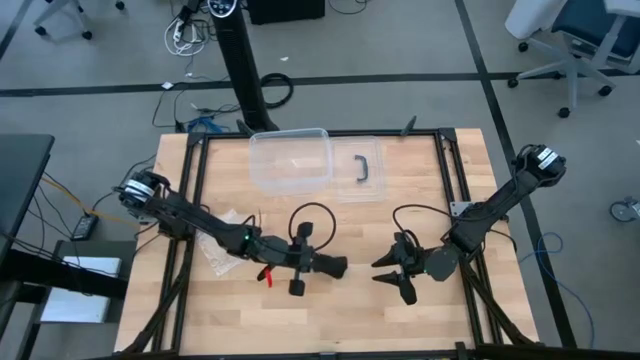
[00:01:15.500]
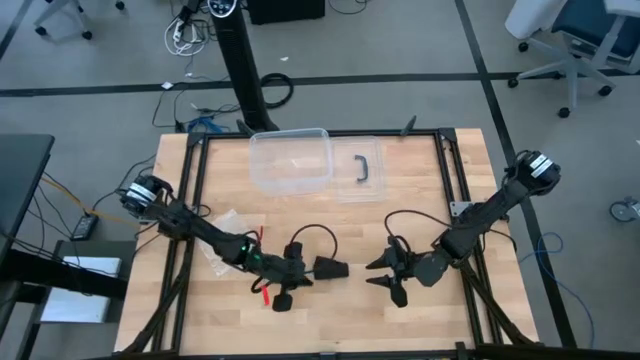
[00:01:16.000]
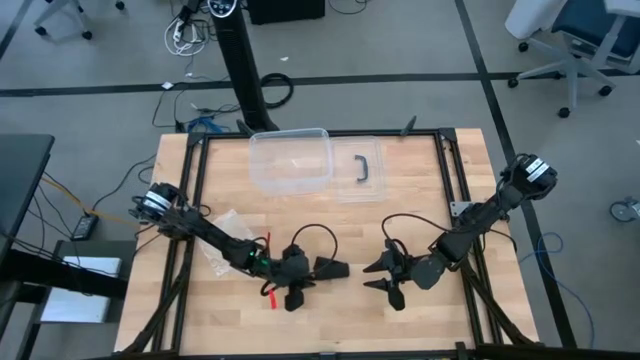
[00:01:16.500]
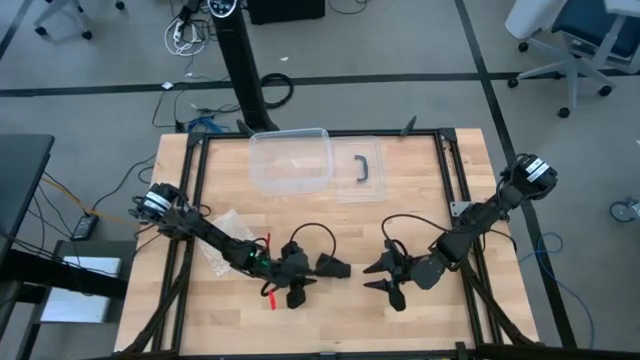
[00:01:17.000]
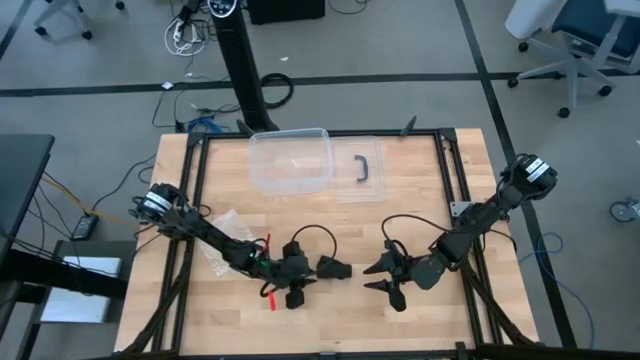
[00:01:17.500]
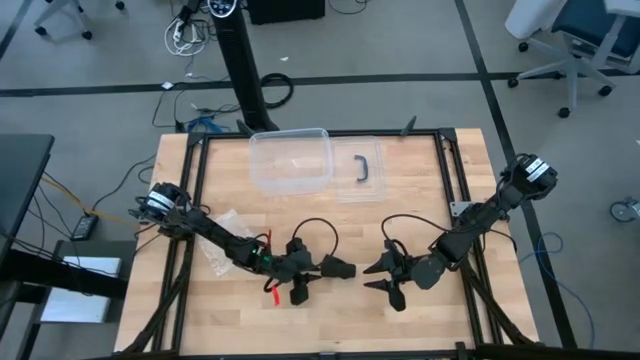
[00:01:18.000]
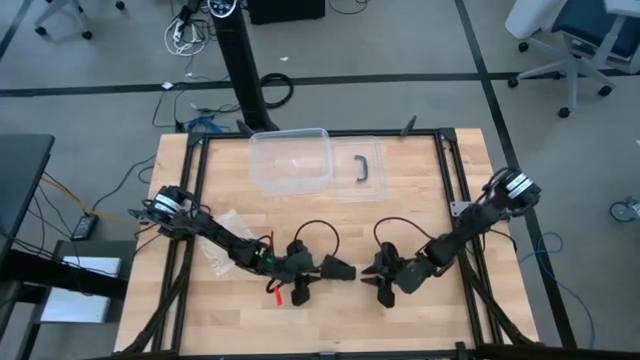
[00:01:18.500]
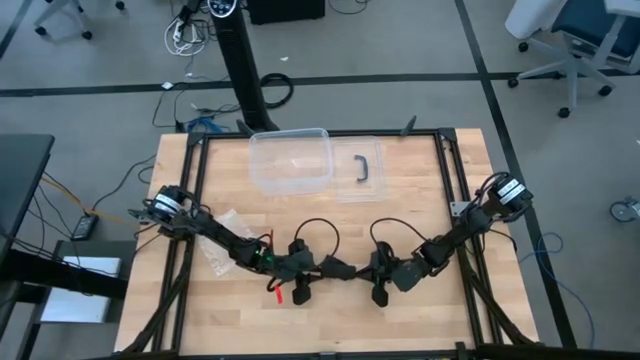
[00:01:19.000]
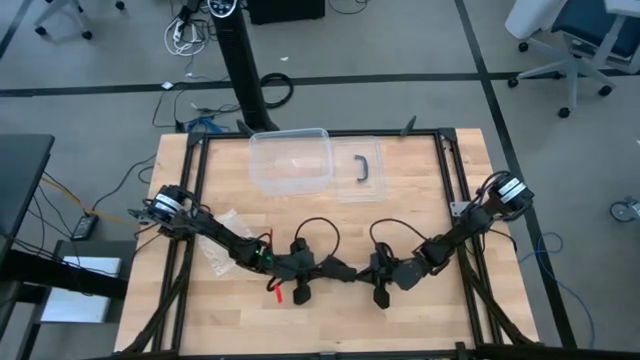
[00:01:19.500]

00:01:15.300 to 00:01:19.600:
Task: Roll bandage
Roll the black bandage

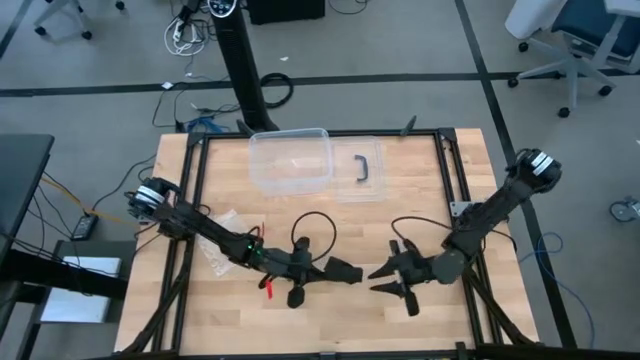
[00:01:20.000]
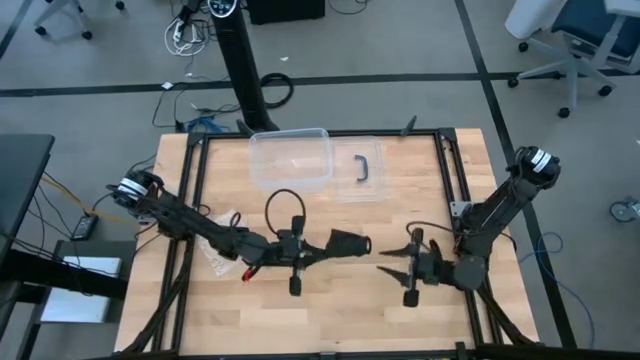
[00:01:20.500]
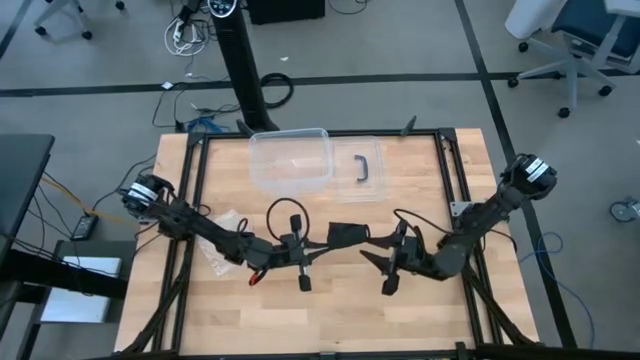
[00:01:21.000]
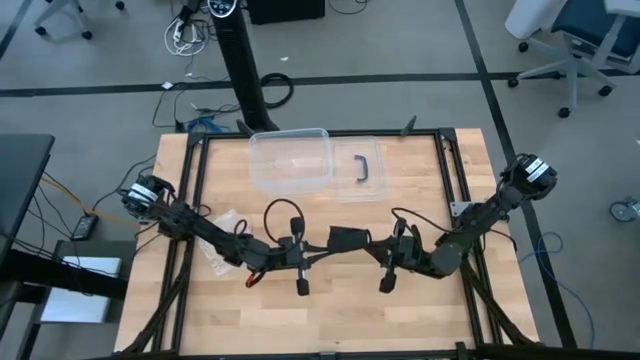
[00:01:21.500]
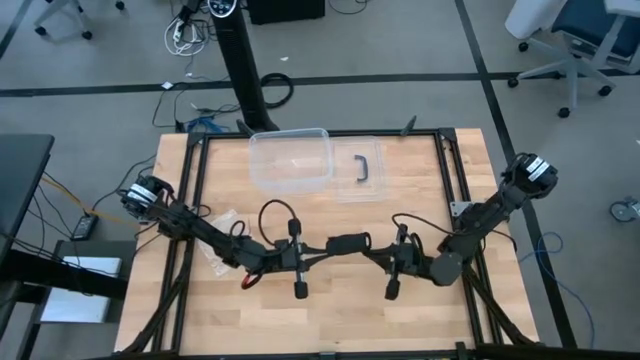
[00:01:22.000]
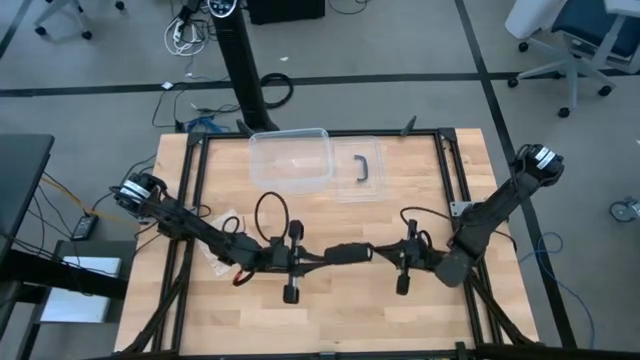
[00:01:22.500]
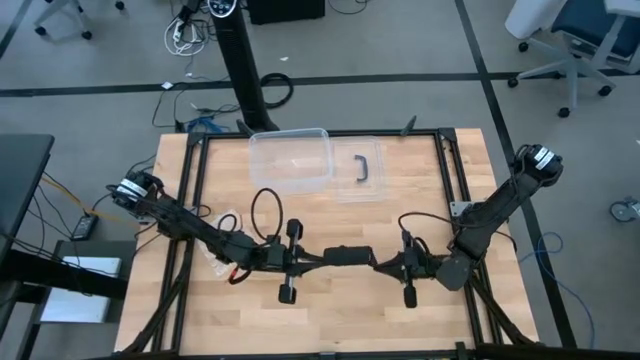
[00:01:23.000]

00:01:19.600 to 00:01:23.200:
Roll the black bandage

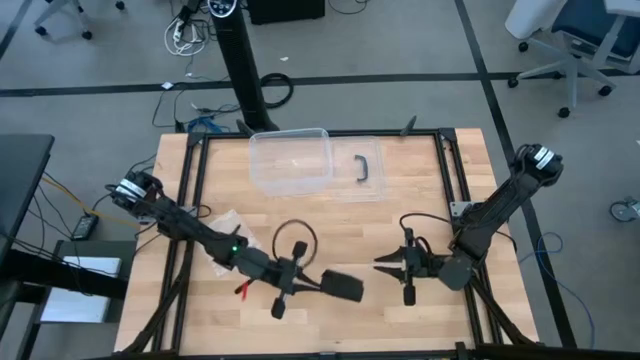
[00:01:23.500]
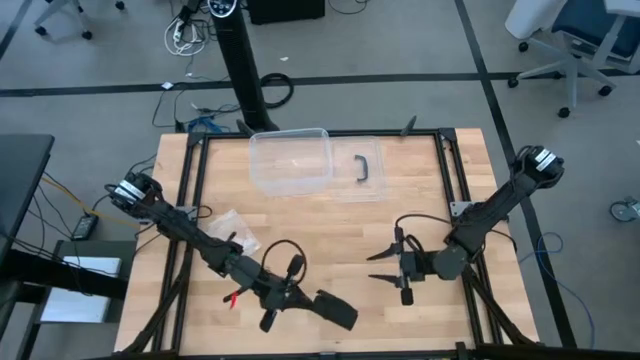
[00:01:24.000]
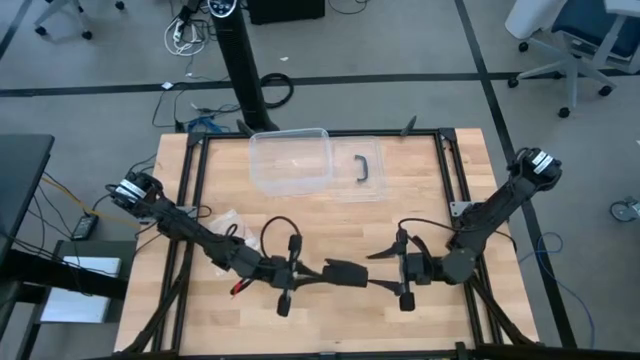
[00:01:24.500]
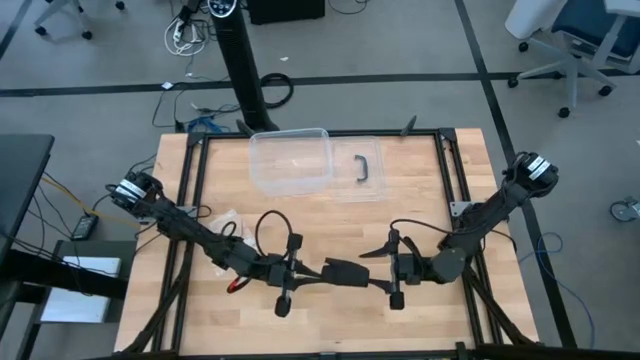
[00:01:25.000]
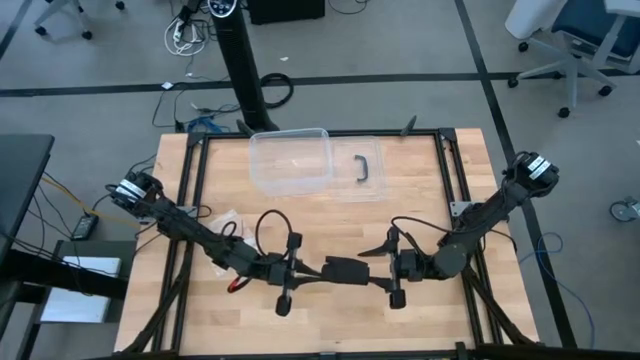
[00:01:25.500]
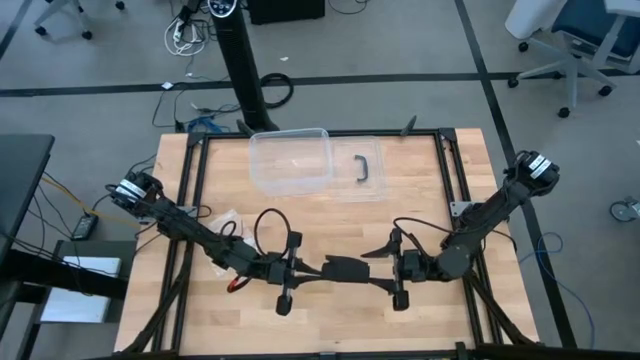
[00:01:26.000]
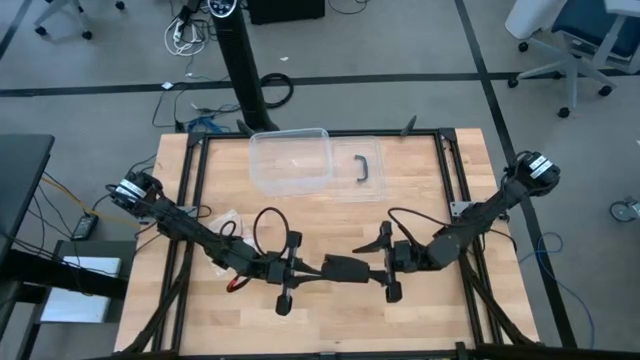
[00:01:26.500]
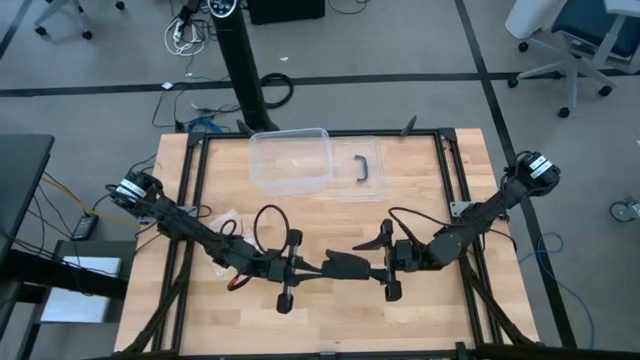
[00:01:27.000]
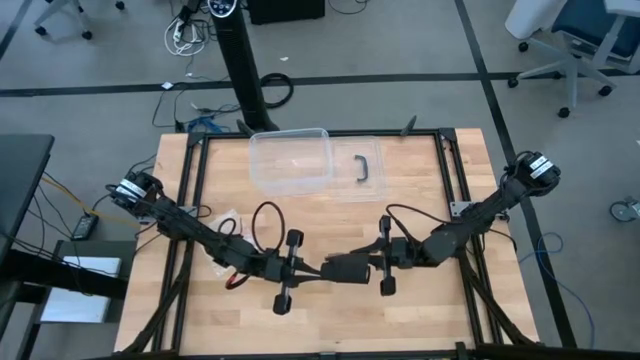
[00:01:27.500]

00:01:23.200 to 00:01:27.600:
Roll the black bandage

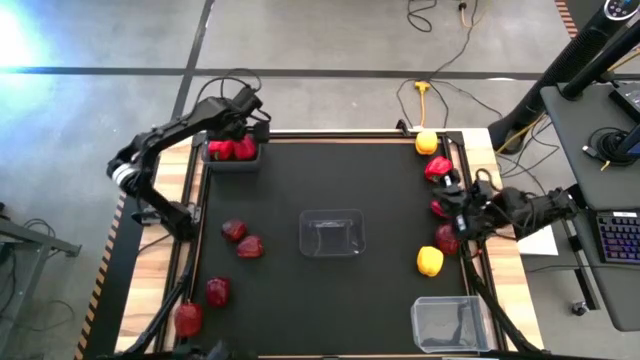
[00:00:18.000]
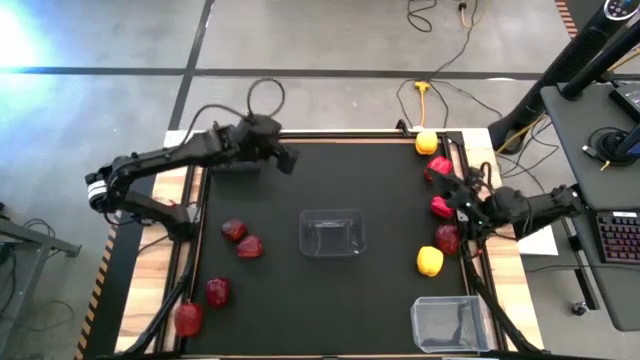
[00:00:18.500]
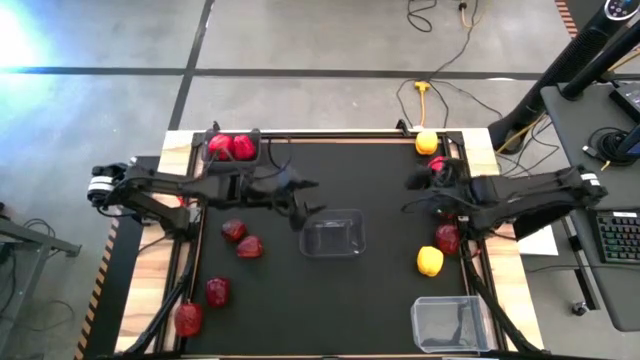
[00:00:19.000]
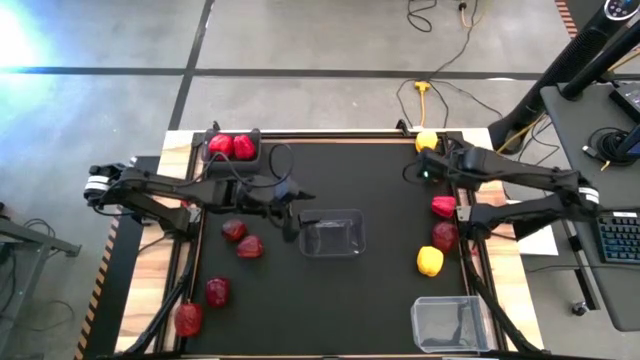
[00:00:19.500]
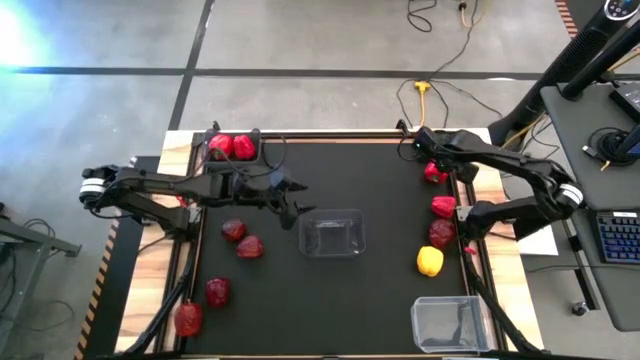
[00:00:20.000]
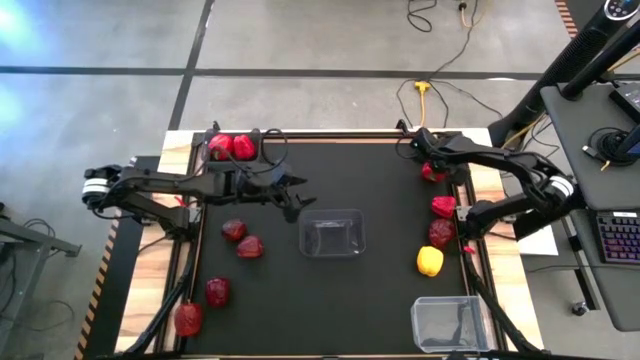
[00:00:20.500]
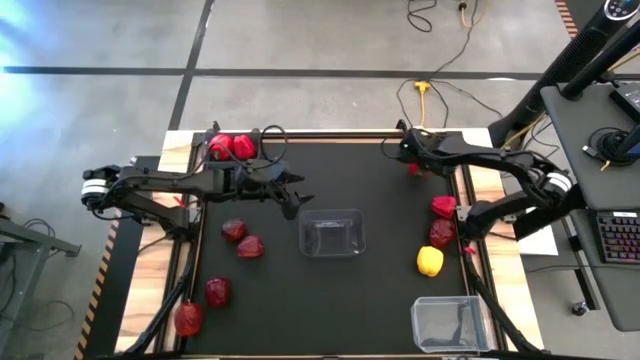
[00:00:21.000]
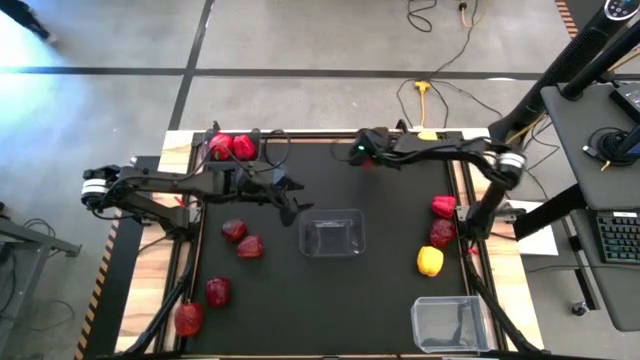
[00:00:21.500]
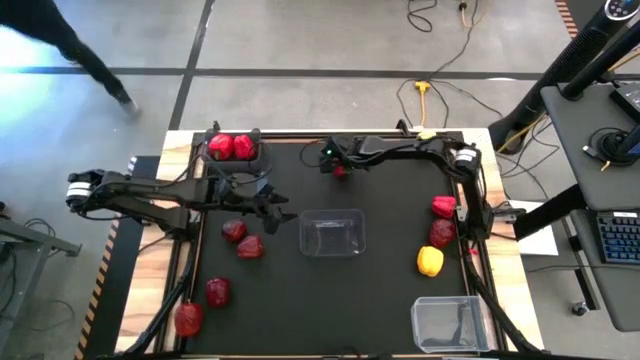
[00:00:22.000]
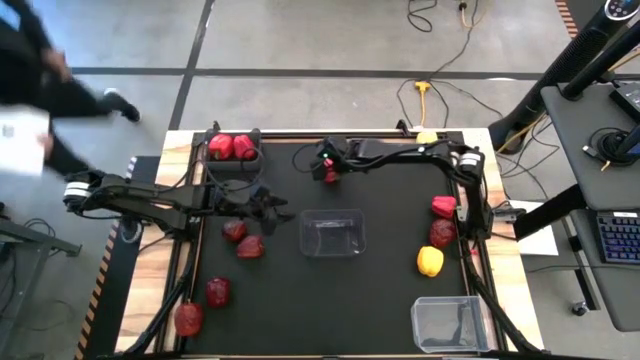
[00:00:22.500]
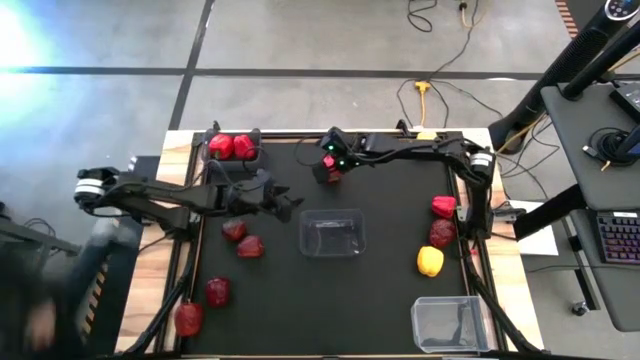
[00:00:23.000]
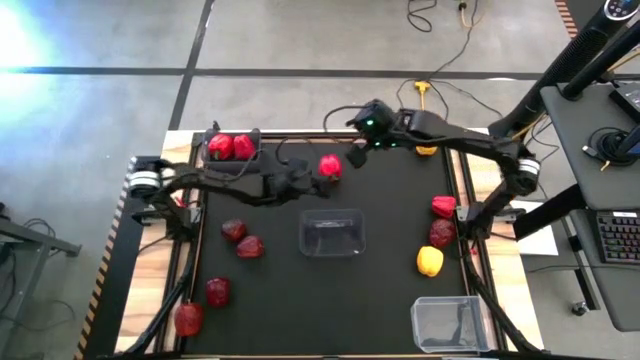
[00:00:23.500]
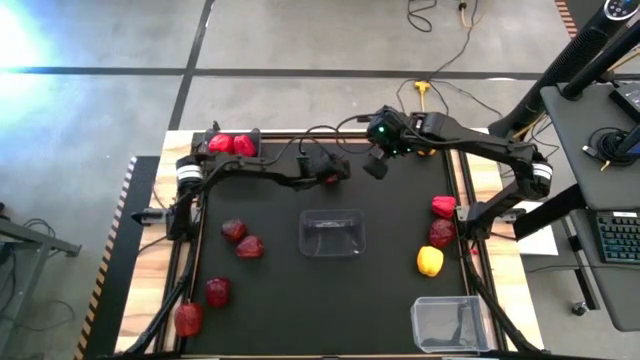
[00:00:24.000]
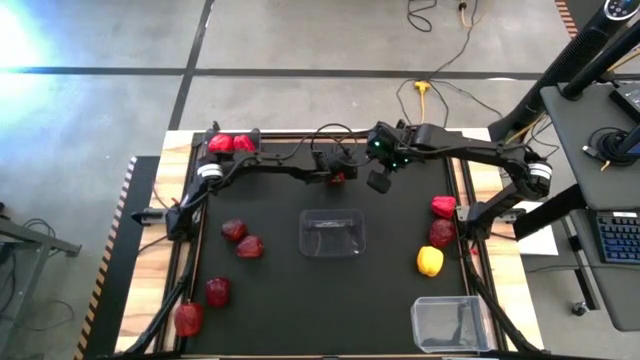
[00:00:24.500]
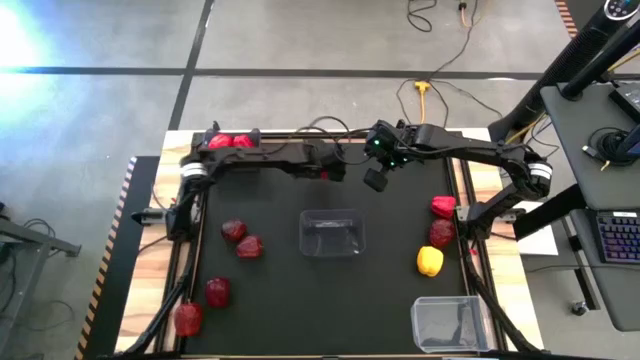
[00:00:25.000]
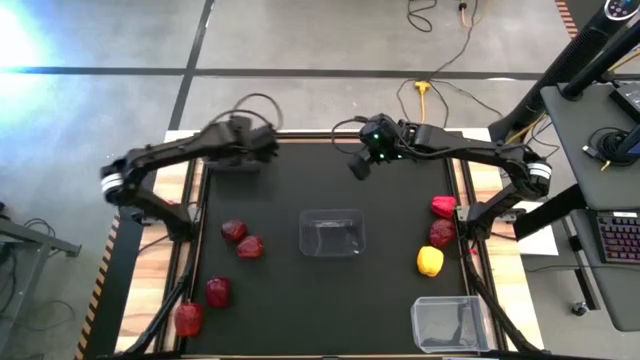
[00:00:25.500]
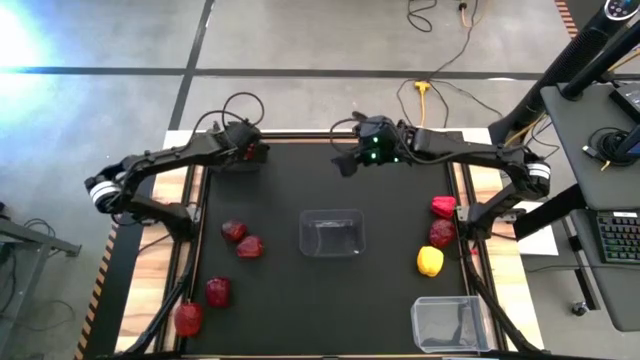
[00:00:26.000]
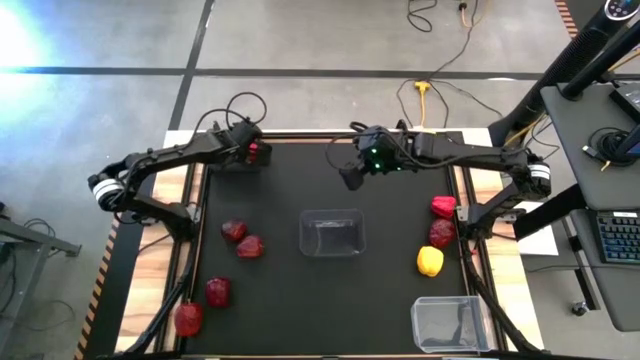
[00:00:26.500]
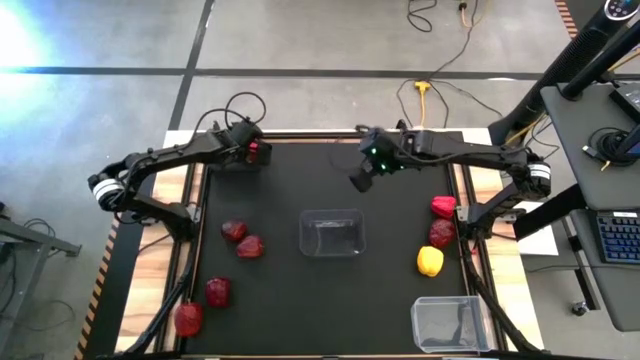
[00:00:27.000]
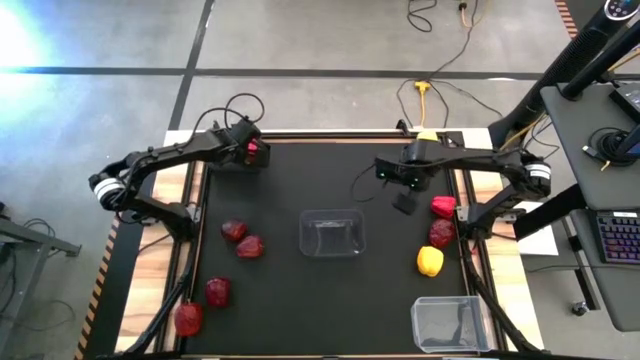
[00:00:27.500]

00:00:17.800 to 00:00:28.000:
Task: Sort produce into baskets
Put the red bell pepper into the top black bin
